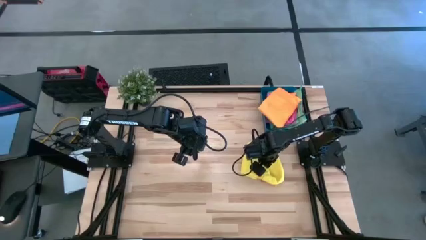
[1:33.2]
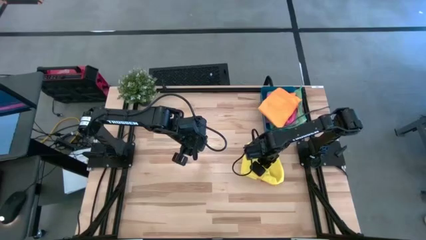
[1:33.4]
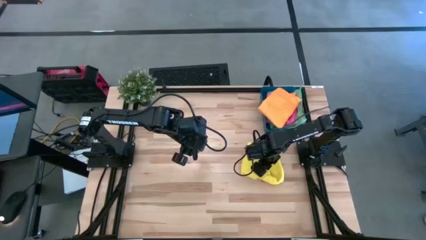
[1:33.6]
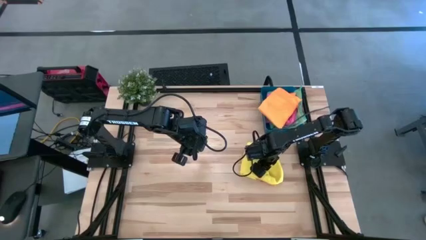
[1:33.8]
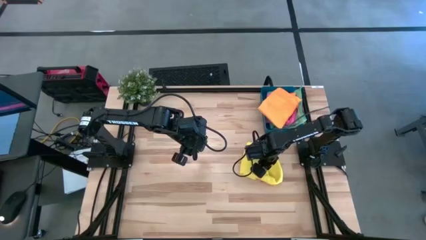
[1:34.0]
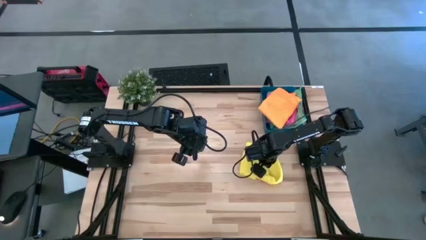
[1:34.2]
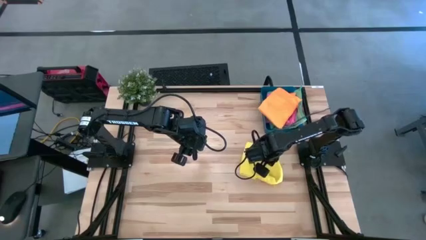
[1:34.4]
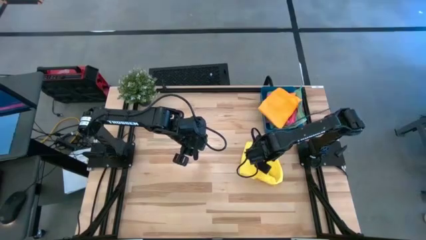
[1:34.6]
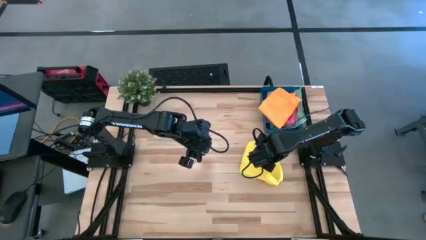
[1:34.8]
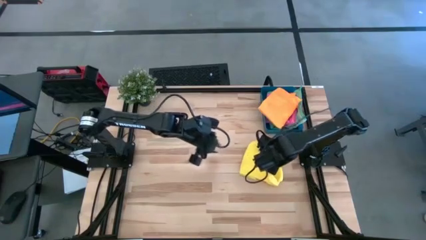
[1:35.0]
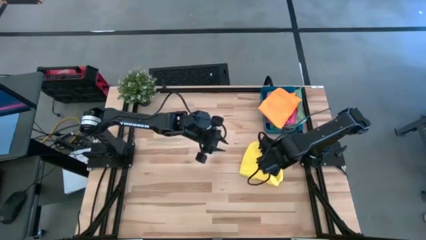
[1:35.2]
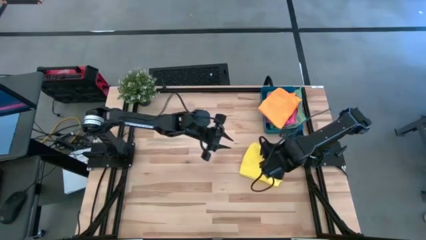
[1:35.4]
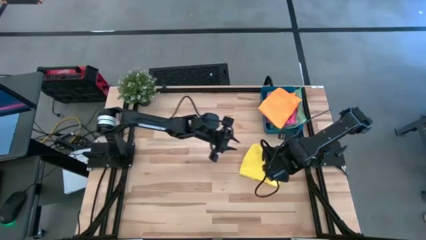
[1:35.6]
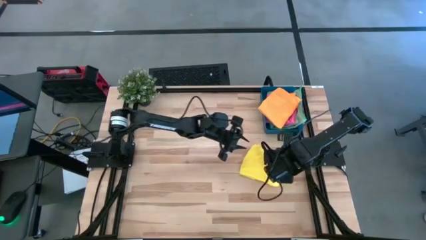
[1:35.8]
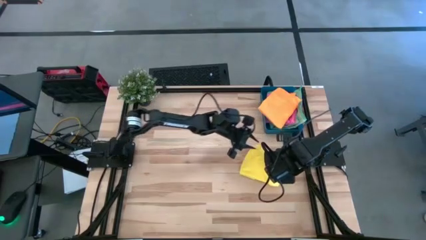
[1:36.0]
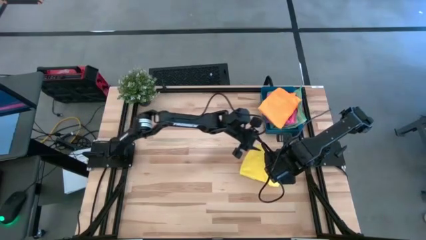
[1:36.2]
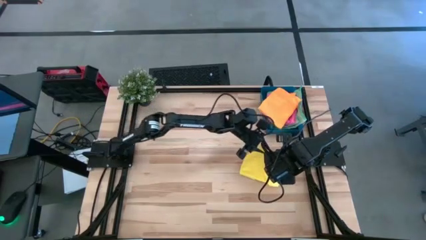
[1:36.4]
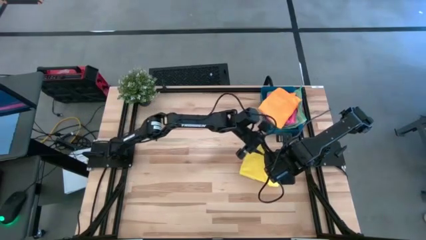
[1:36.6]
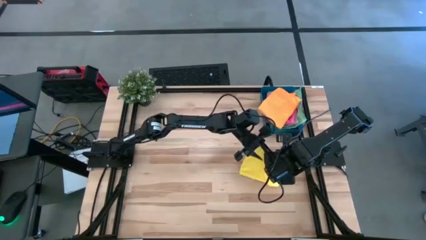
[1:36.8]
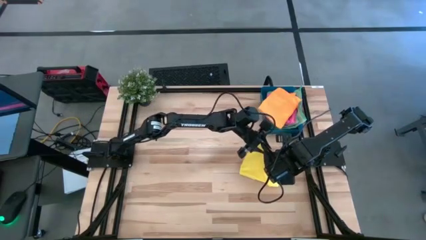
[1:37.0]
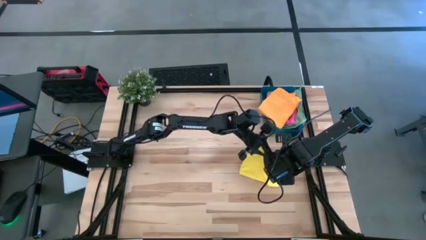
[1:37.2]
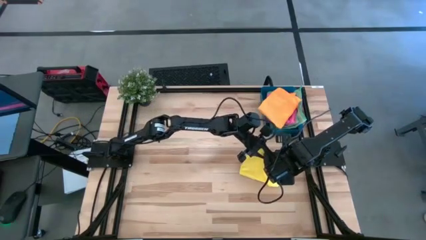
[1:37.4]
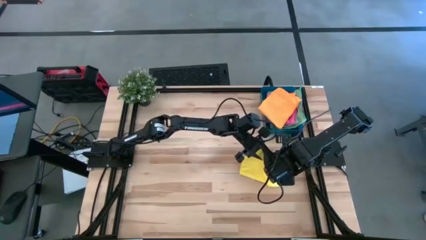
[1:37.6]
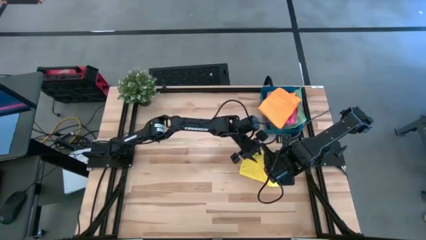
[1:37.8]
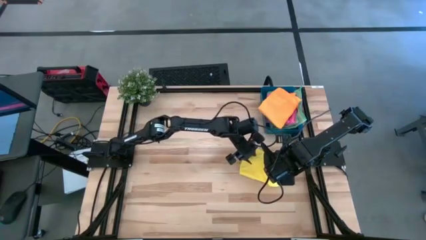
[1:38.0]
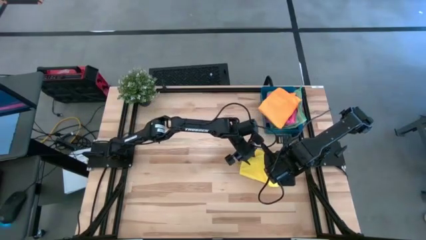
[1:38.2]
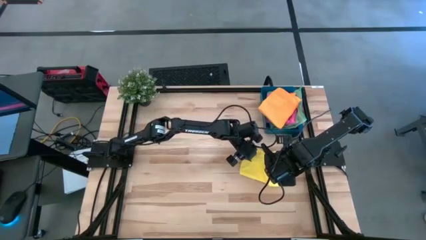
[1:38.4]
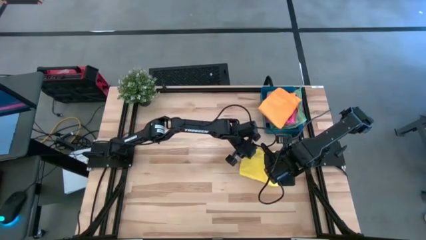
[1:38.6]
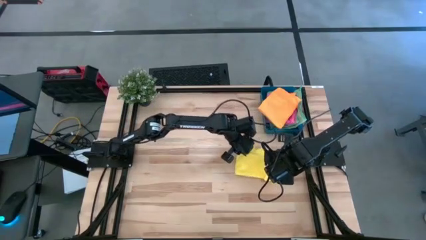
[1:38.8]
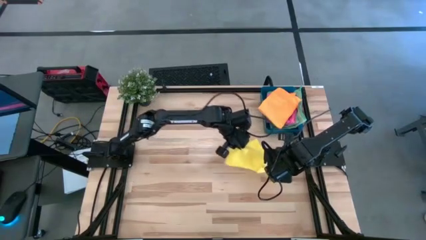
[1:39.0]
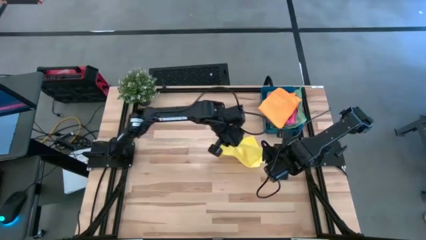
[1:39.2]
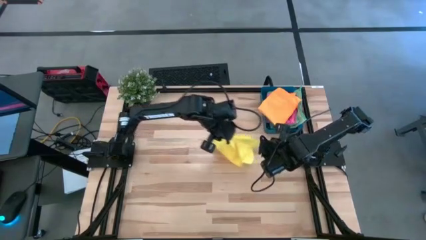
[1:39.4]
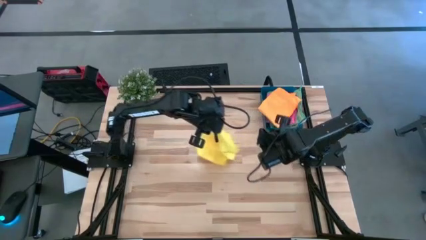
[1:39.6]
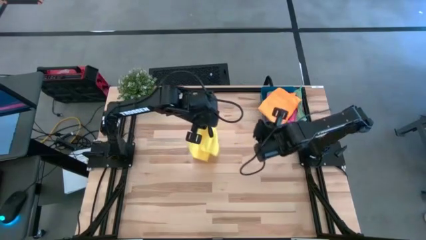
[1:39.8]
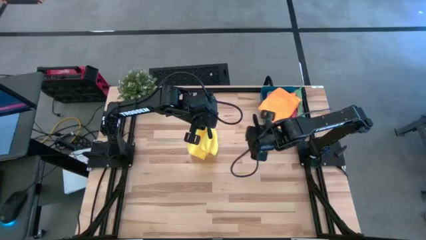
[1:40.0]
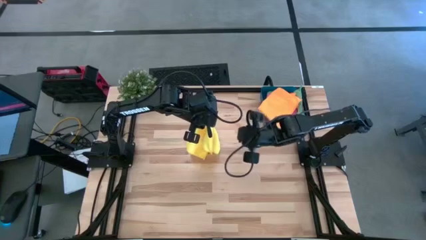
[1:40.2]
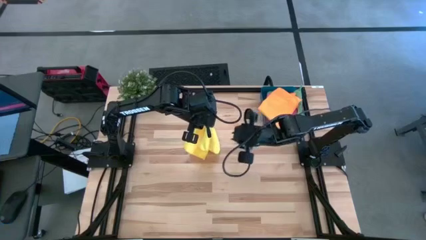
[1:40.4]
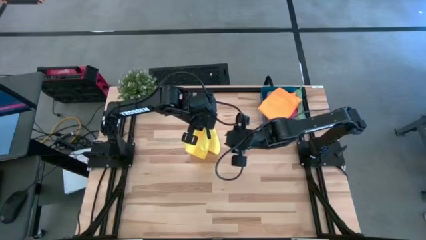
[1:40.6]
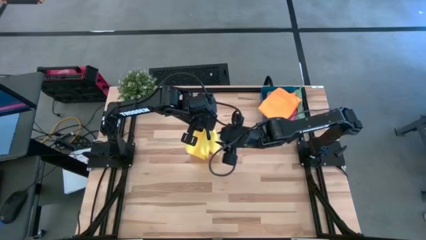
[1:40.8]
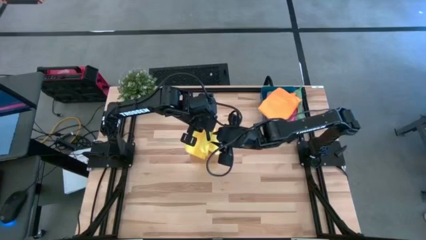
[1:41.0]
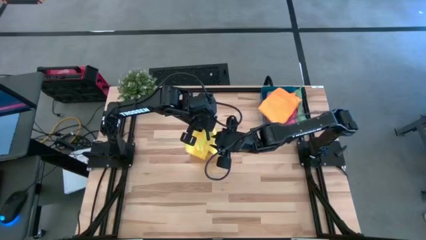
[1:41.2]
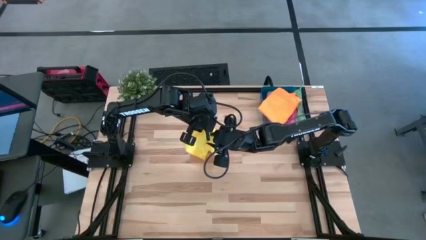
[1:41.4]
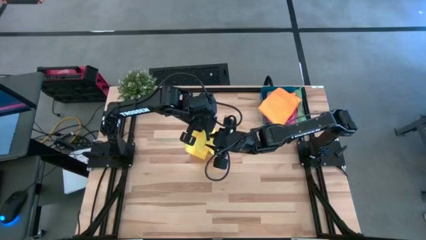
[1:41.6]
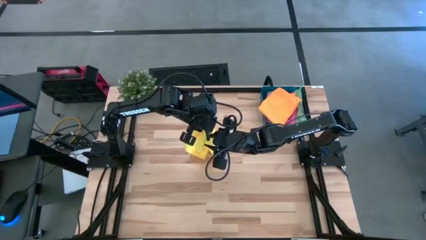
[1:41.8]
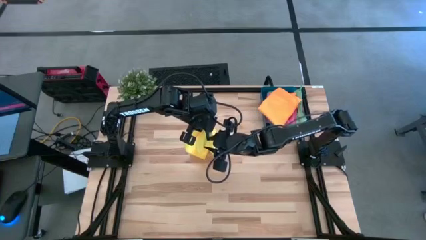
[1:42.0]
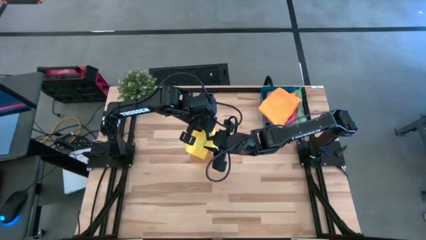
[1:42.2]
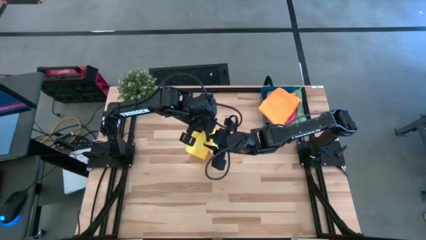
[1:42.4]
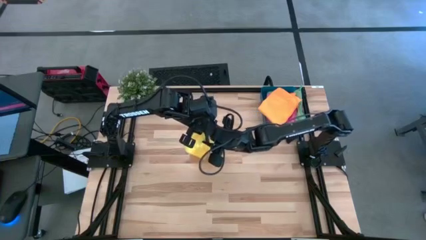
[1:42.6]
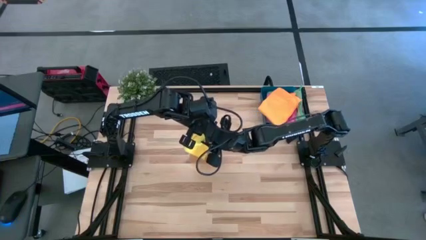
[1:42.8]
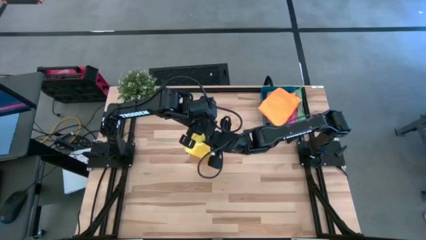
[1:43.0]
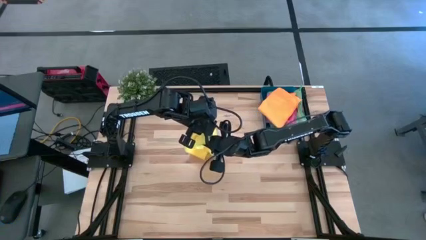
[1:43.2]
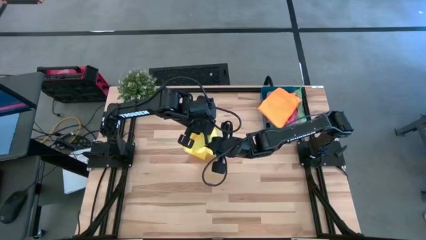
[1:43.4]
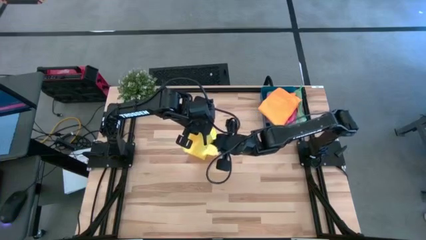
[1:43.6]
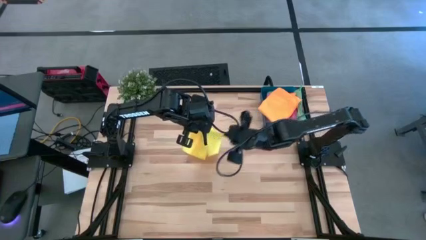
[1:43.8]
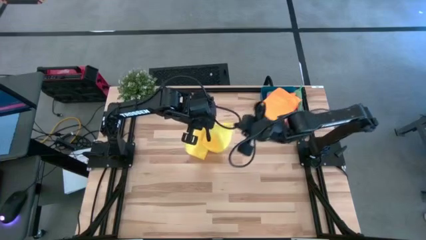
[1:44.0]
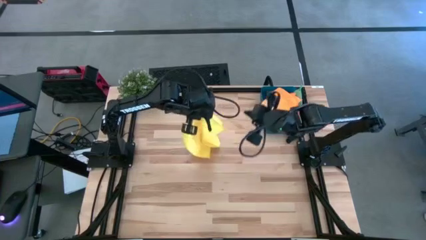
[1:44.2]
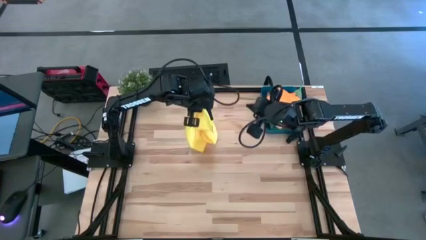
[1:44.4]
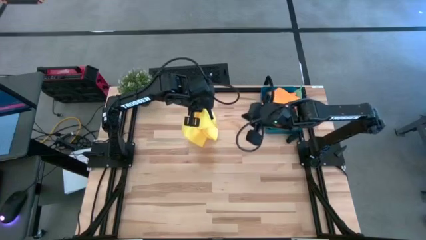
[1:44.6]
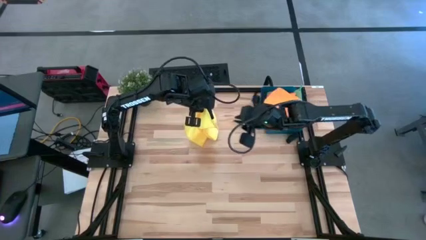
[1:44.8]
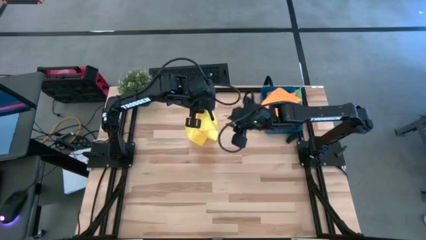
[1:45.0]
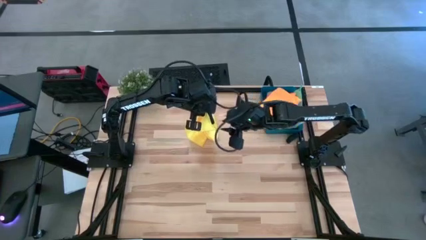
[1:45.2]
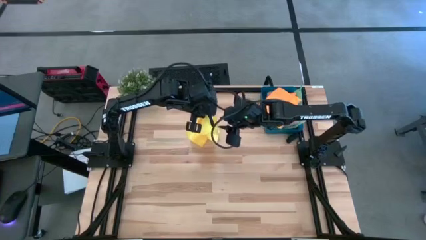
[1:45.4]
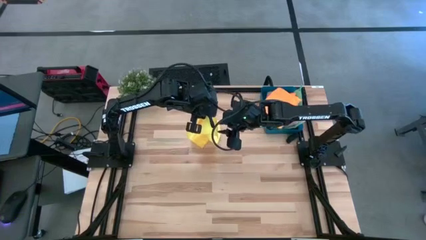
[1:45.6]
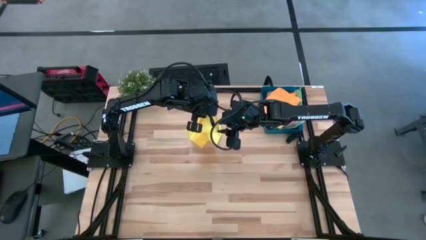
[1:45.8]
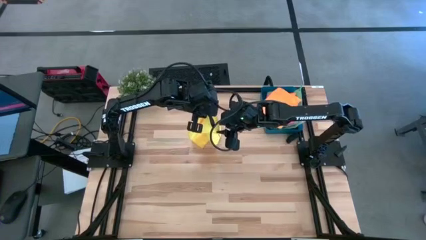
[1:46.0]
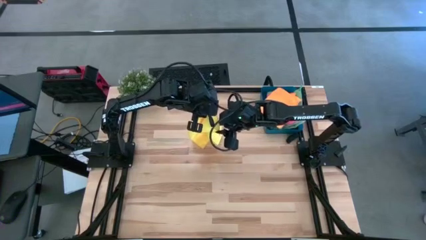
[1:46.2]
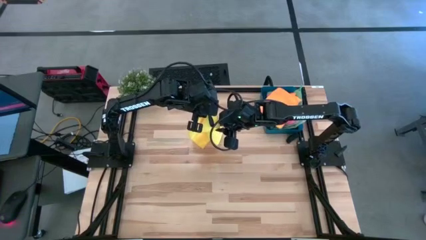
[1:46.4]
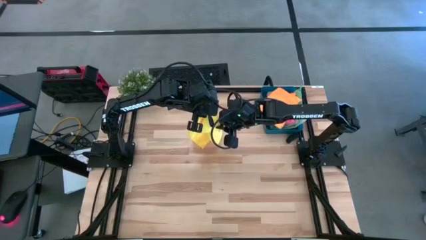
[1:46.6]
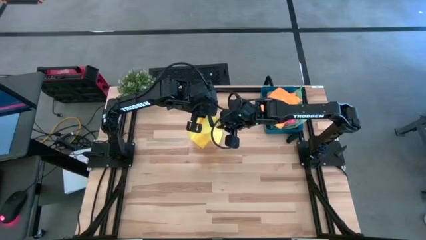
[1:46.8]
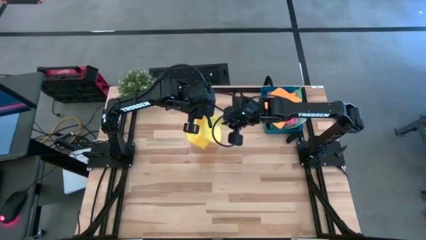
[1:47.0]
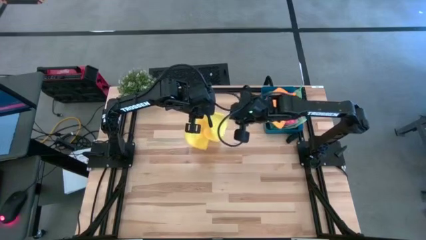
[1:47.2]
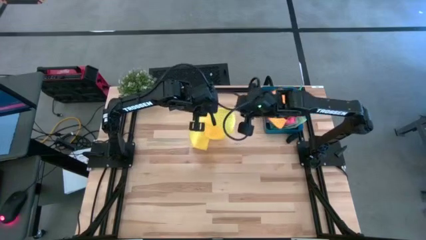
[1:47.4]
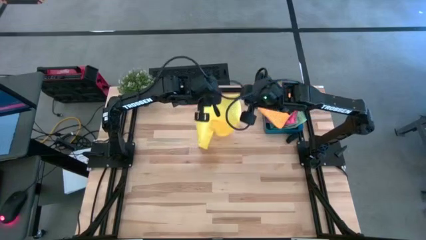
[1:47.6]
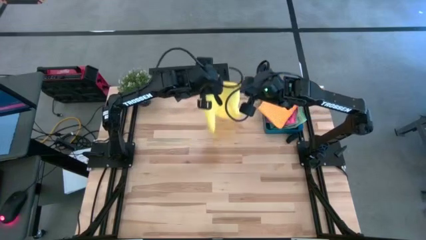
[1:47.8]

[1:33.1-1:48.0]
Task: Fold microfiber towels
Fold the yellow microfiber towel on the table
